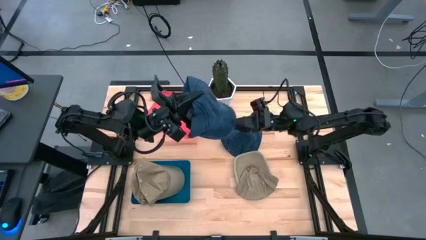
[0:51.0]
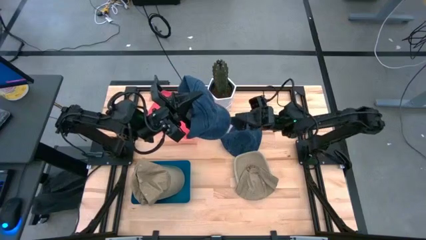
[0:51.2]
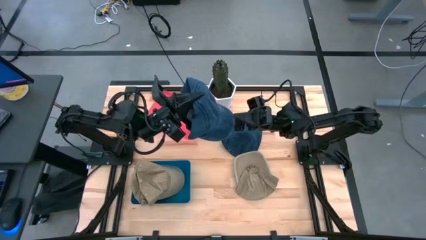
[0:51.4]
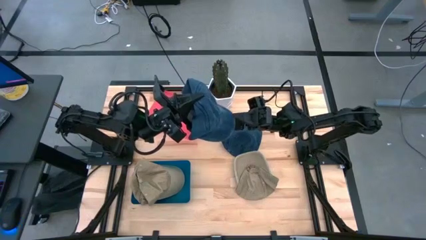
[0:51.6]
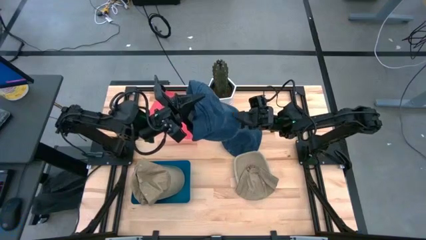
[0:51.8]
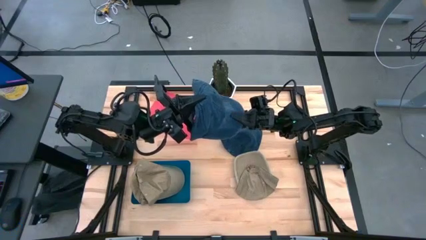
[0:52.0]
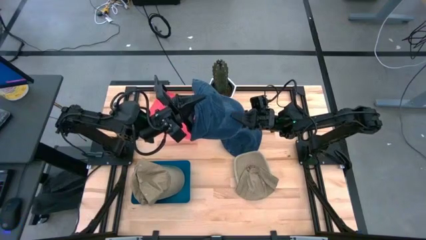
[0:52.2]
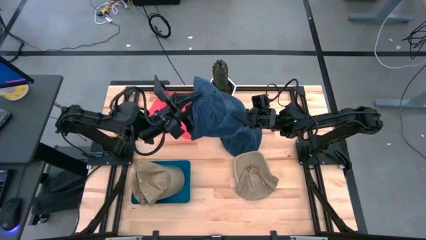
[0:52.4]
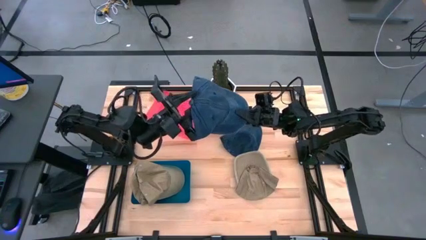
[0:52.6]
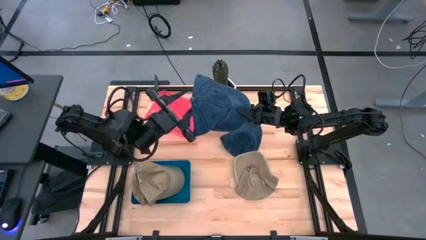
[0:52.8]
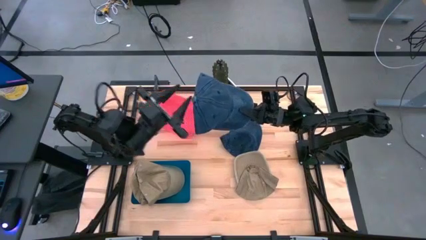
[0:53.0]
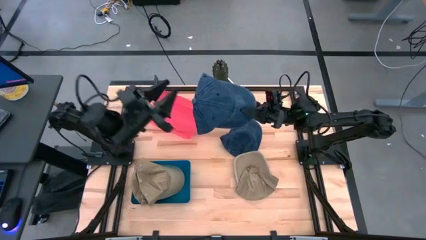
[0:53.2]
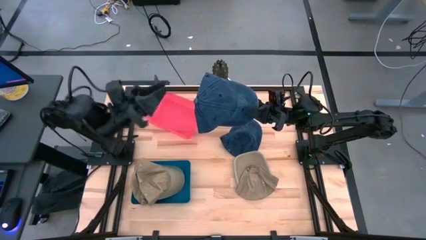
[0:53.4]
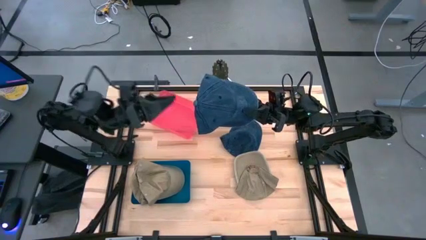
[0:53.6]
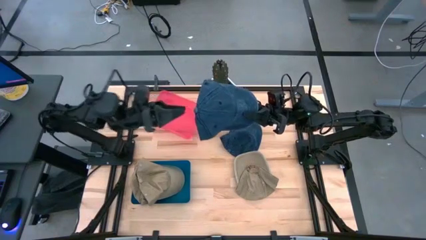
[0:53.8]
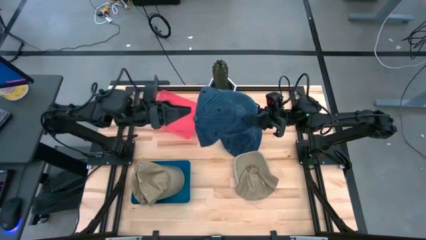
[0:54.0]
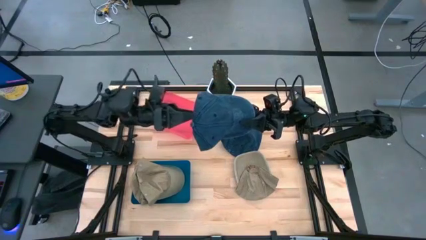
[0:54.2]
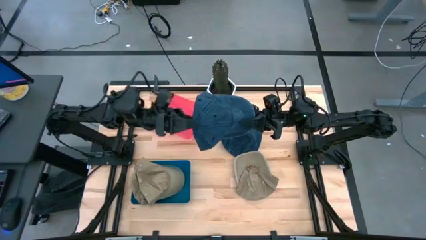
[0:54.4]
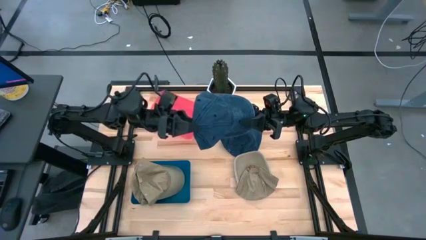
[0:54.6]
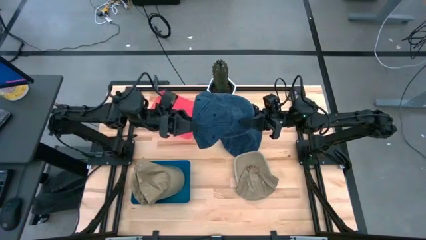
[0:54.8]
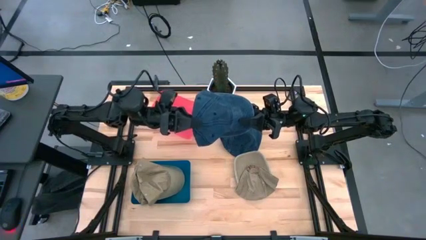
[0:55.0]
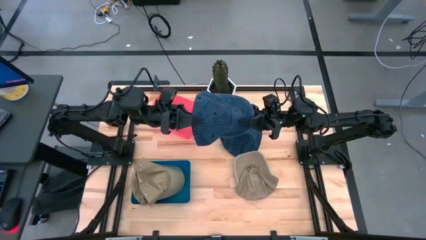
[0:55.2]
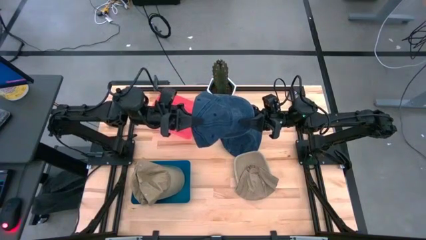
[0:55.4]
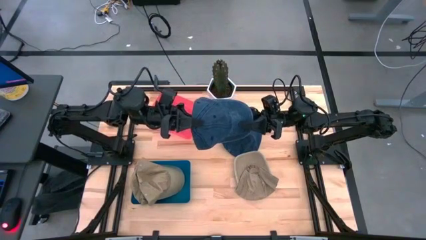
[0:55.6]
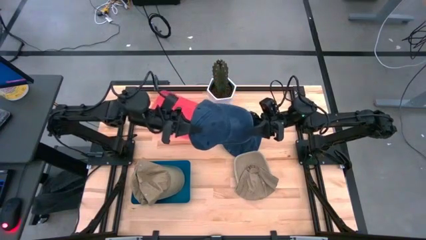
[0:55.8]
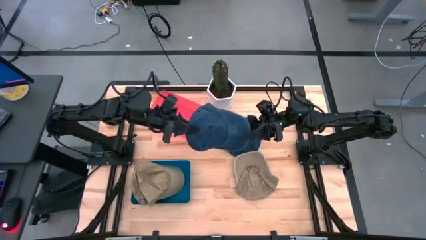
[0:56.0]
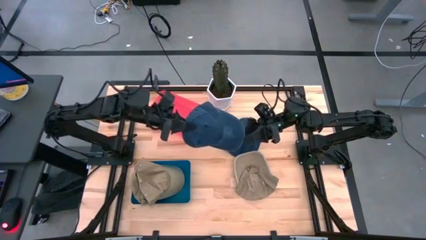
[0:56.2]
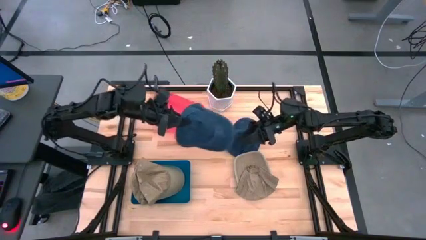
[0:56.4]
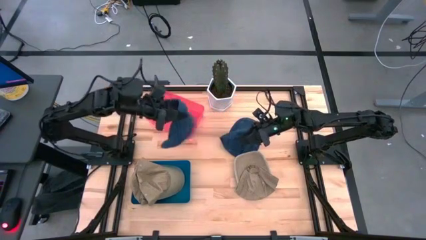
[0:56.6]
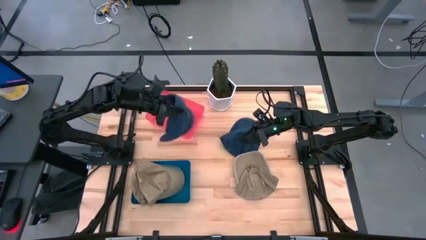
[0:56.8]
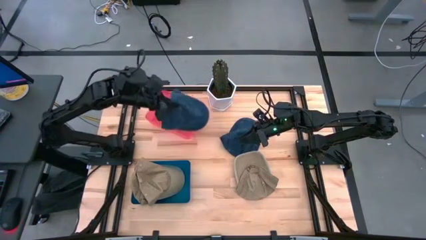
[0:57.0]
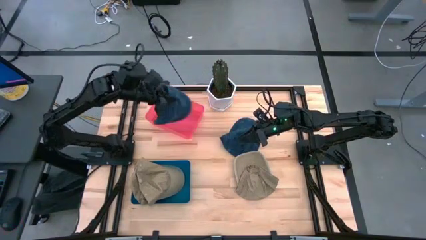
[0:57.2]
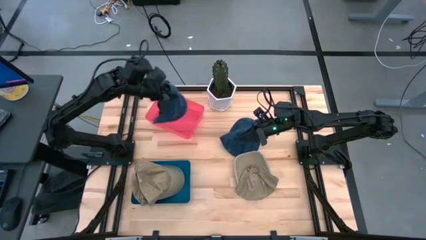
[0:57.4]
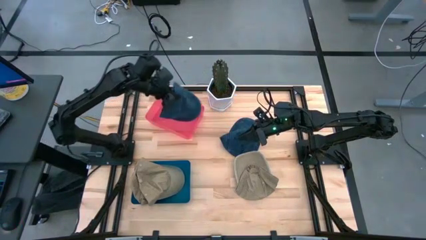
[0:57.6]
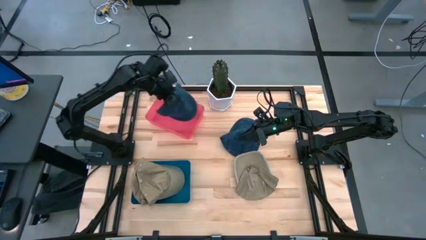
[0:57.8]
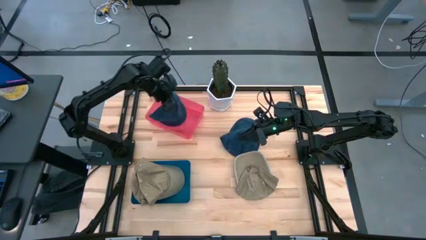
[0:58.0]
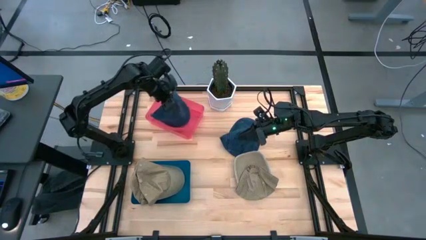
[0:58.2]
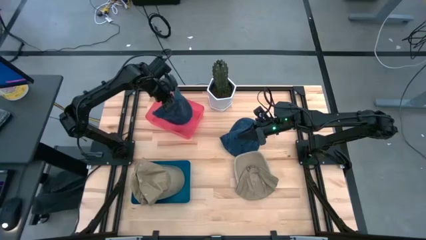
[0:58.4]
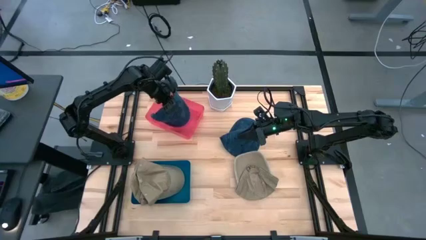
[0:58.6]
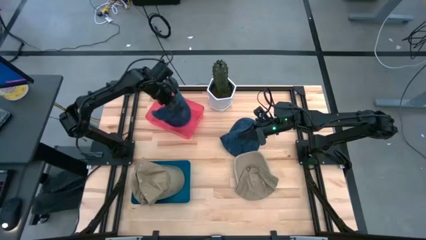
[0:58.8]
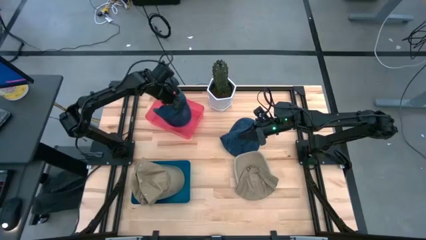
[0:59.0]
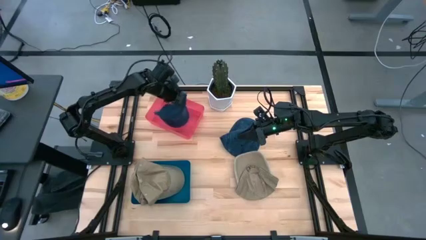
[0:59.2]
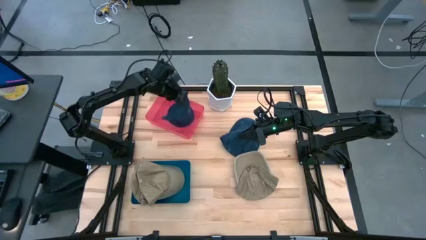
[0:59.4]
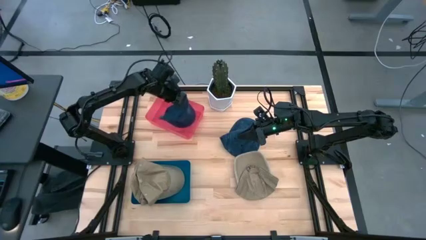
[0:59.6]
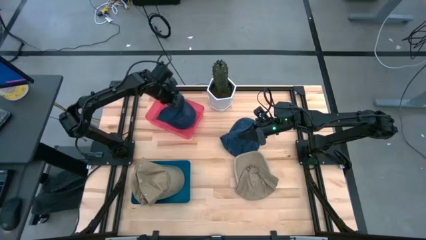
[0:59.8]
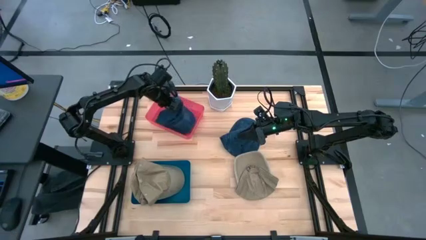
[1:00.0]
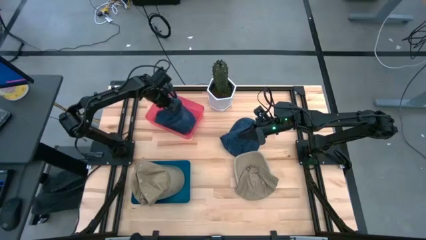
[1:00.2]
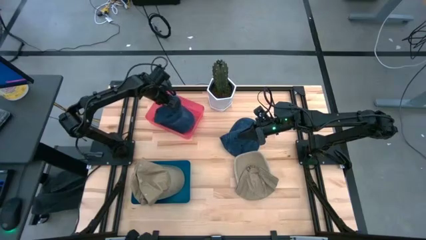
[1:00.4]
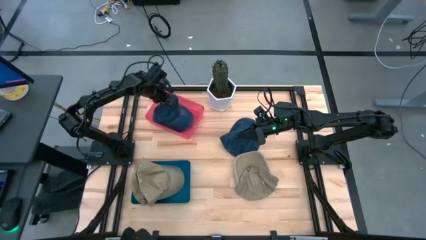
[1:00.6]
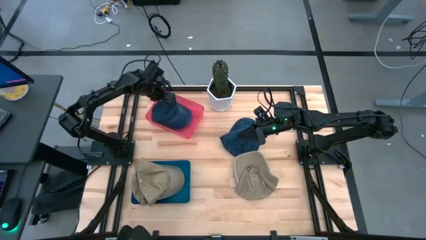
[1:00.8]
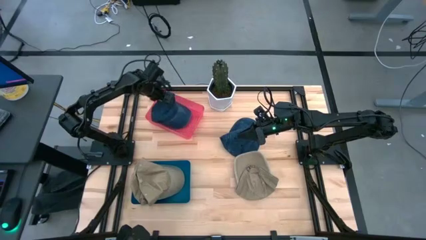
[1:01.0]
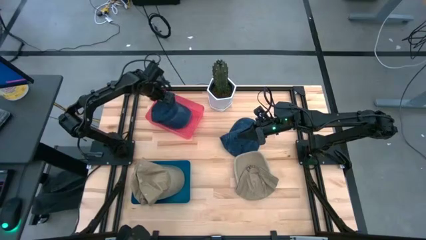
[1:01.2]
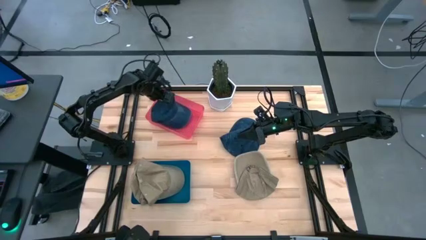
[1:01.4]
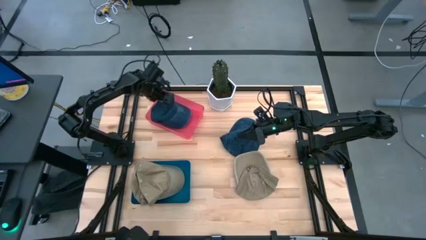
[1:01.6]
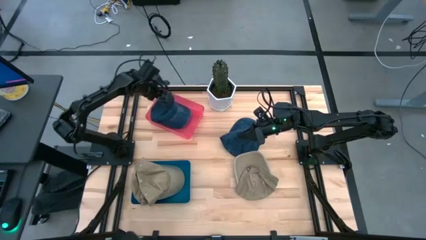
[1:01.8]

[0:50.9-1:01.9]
Task: Pick & Place hat
Put the bottom blue cap into the red bin
